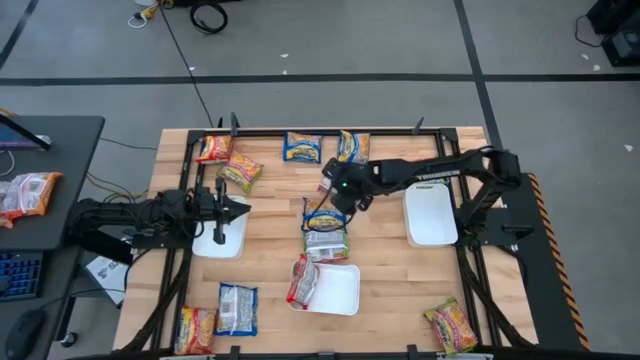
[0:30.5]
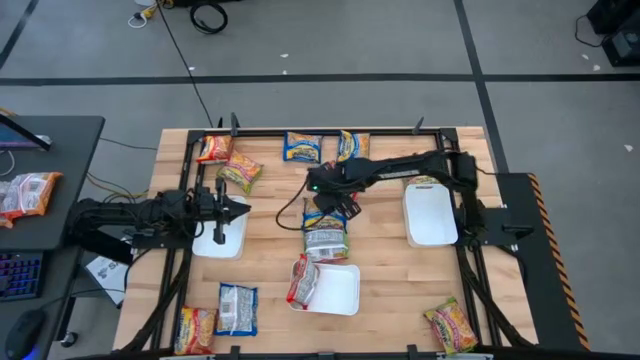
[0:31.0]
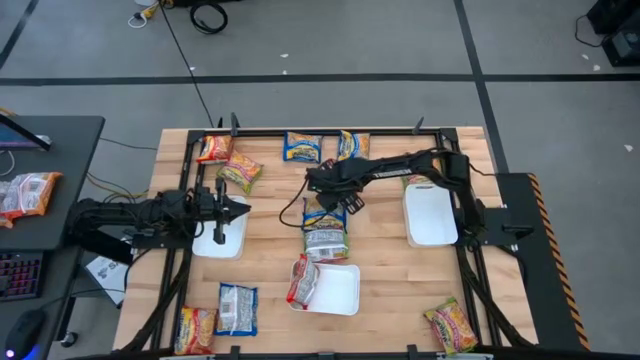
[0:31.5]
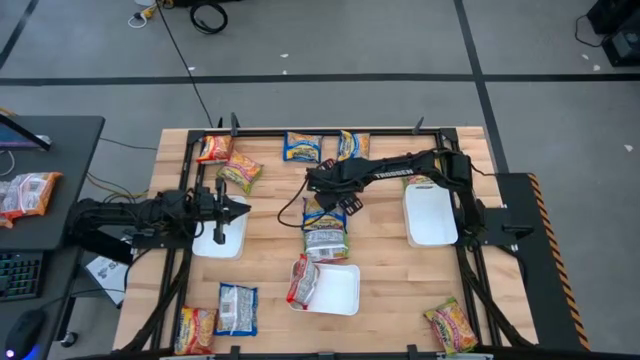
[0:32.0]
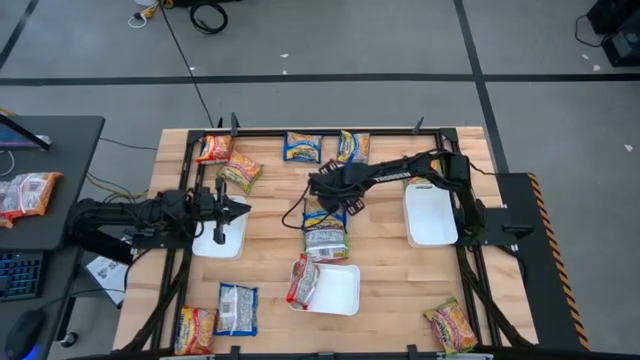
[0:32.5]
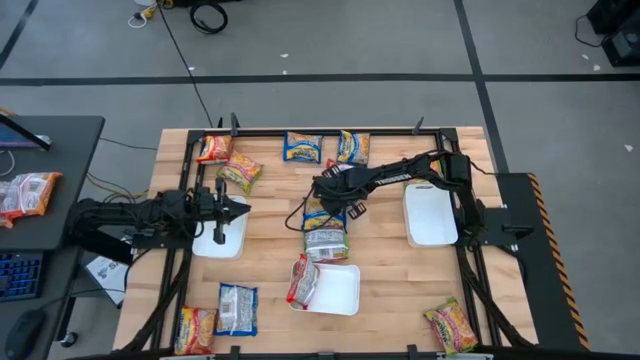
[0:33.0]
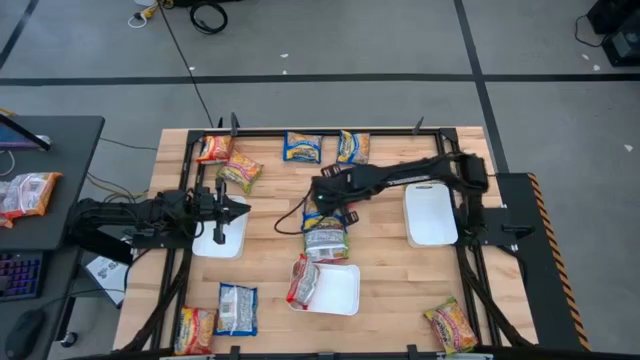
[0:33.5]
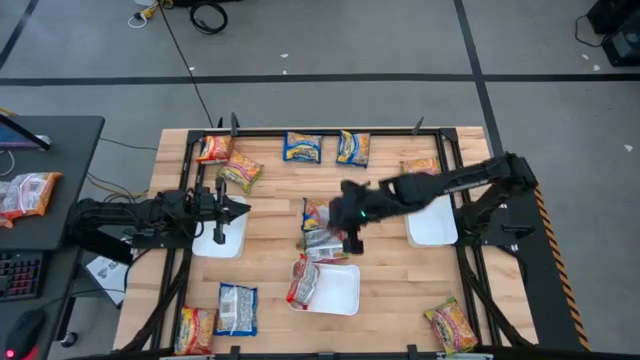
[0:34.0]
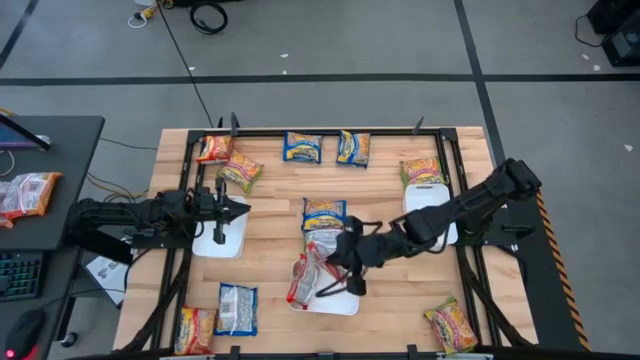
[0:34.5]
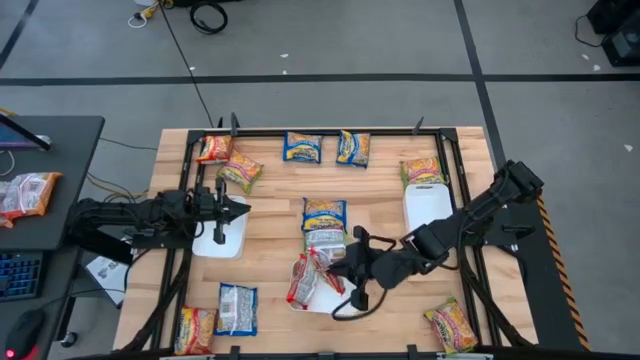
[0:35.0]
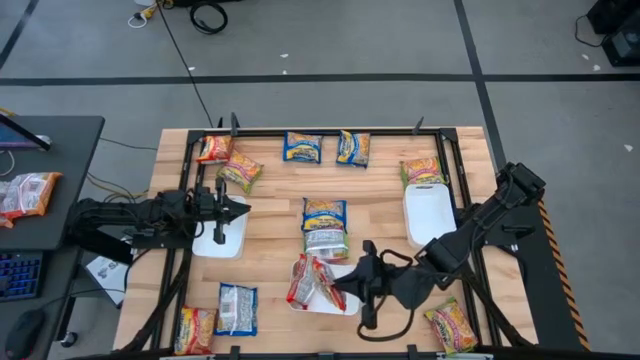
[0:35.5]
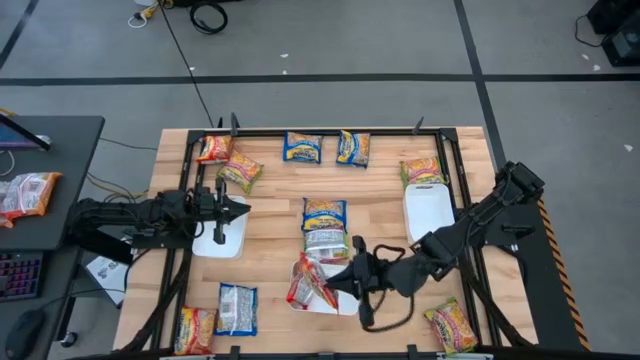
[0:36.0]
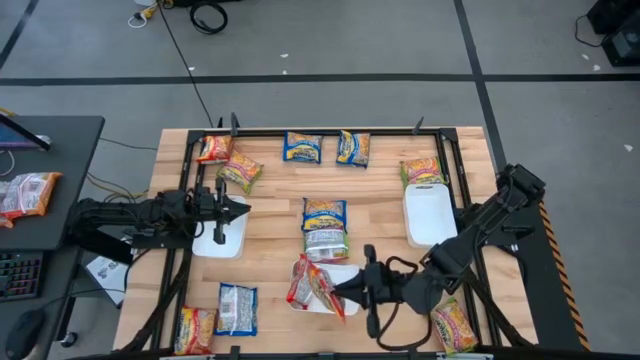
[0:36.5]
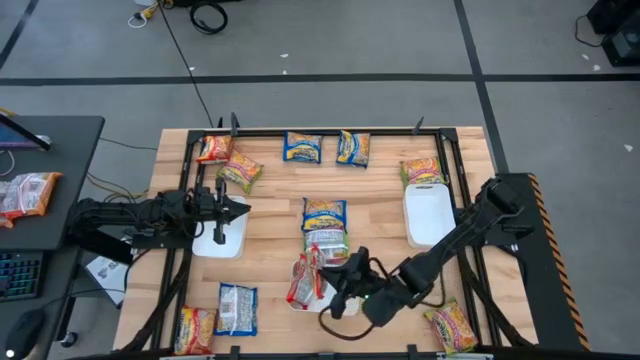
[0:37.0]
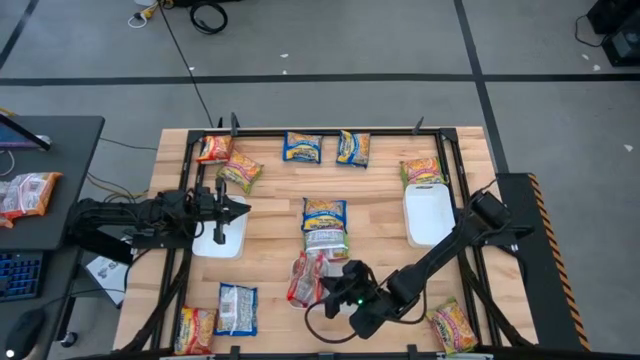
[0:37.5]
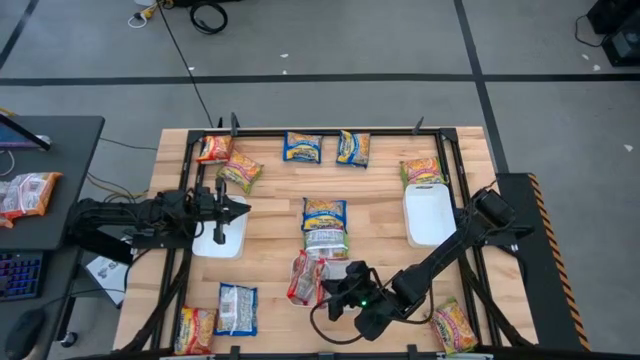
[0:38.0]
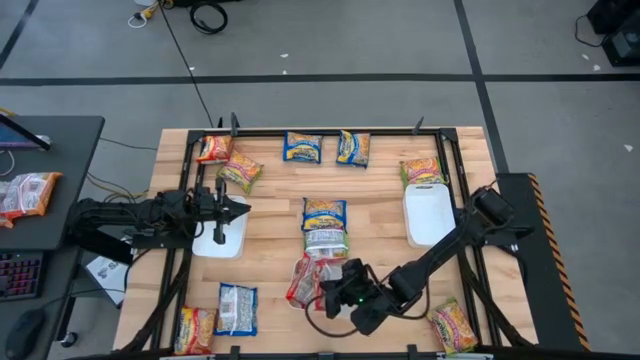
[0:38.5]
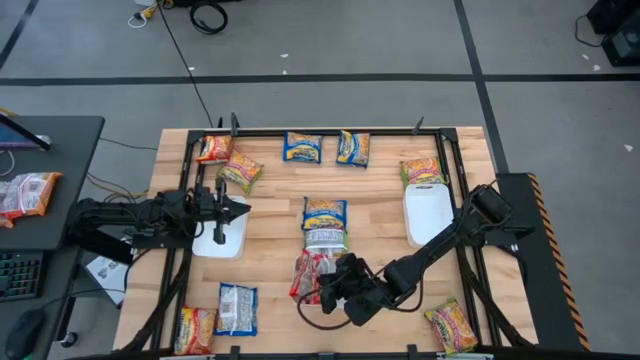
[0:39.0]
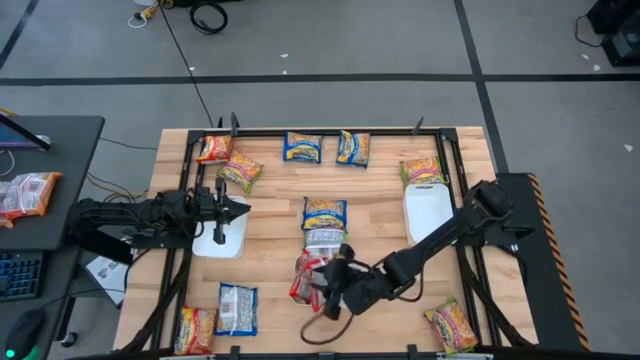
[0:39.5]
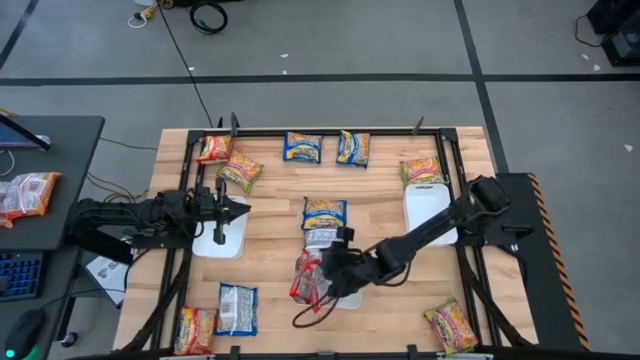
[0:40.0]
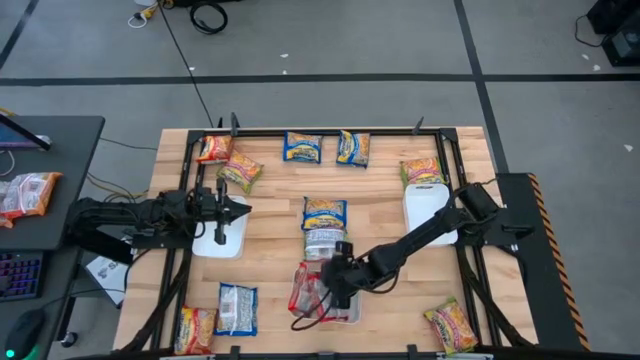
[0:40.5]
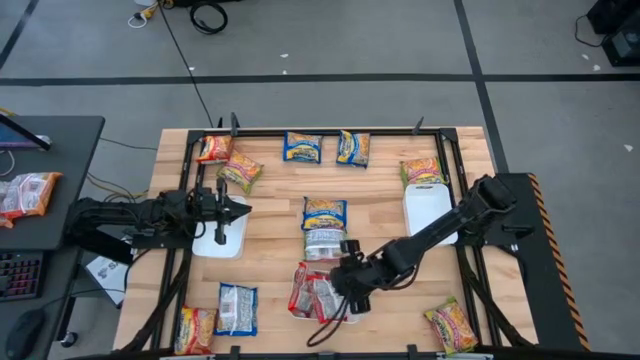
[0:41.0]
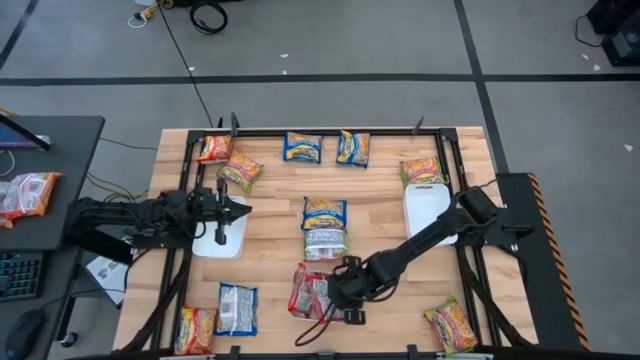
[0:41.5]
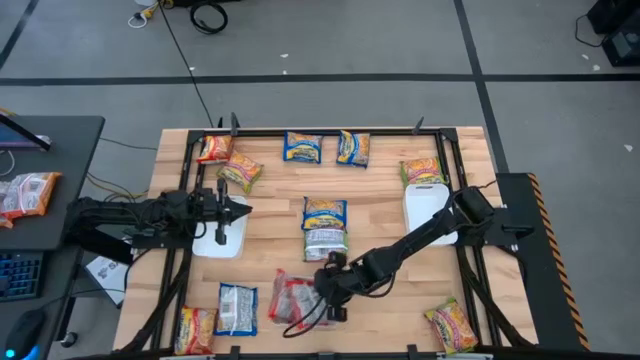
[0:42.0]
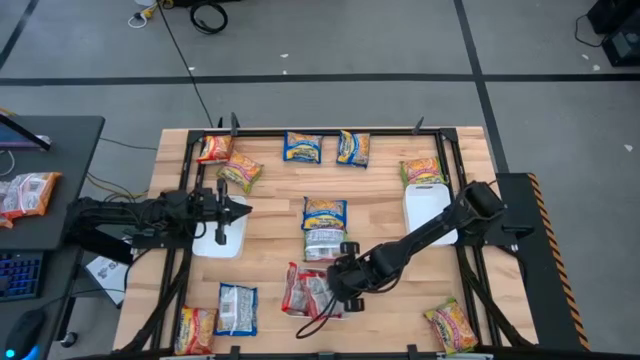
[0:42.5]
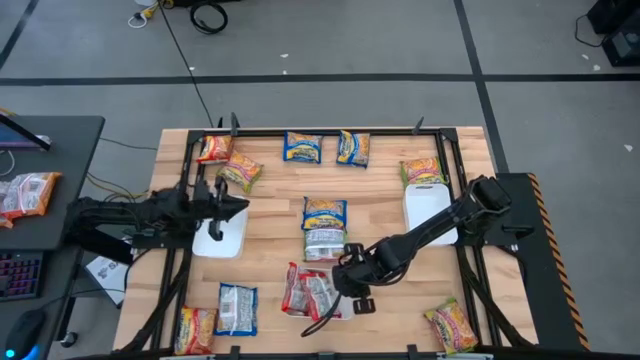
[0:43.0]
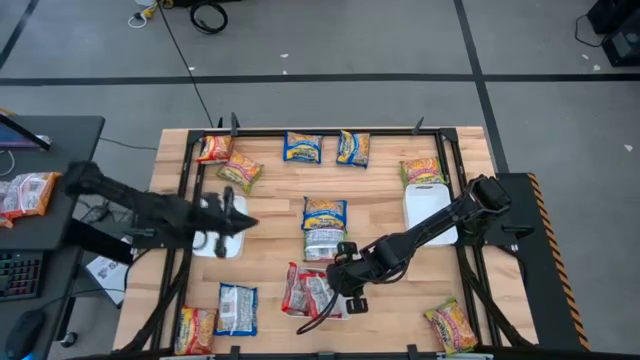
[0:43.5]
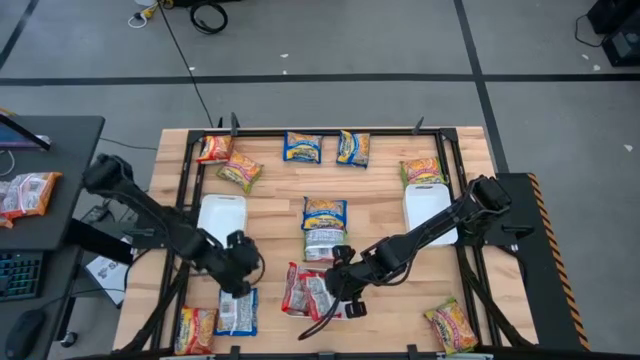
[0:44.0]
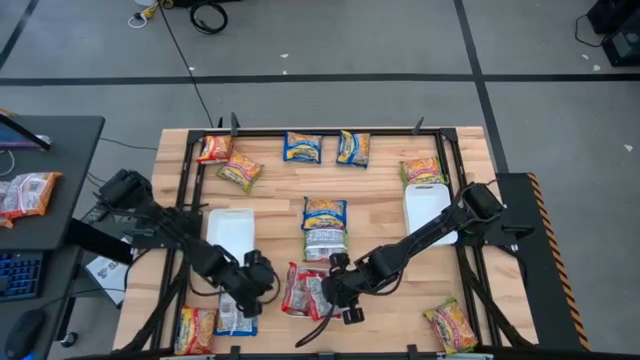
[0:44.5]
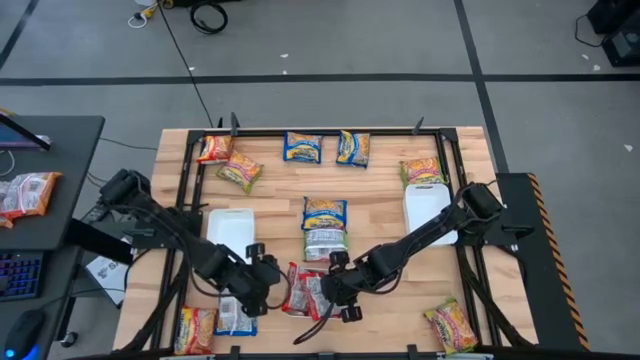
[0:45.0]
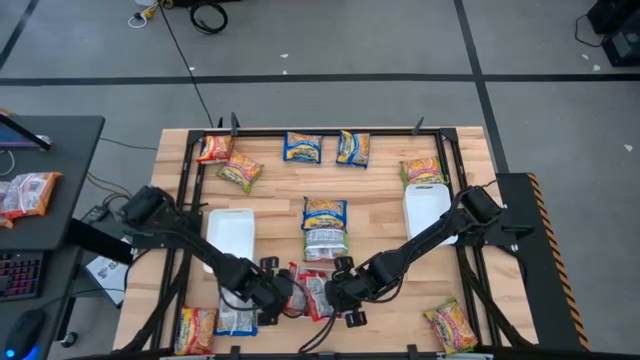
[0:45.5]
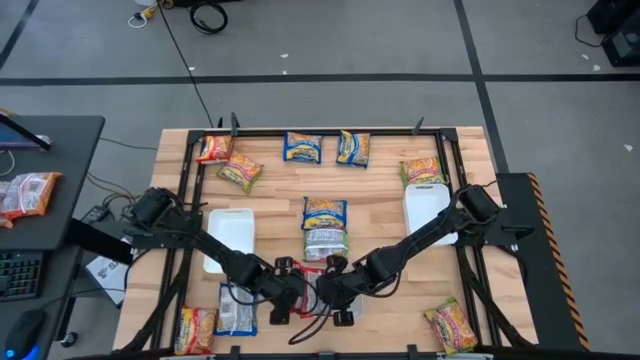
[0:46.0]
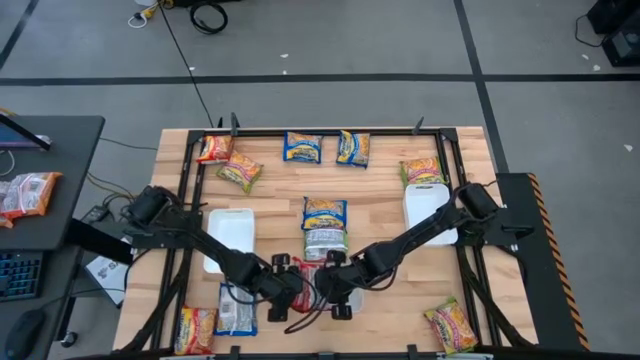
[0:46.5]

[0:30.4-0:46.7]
Task: Sort Maruchan noodles
Put the top right red noodle pack into the bottom white bin

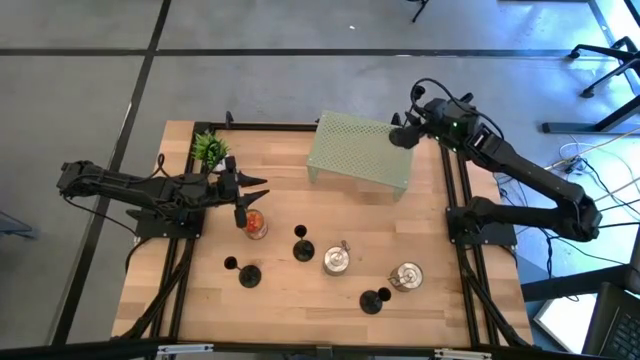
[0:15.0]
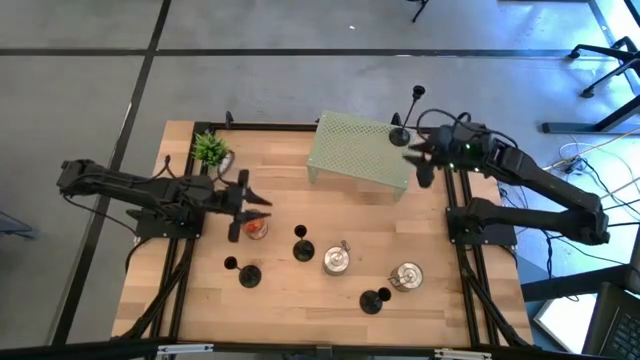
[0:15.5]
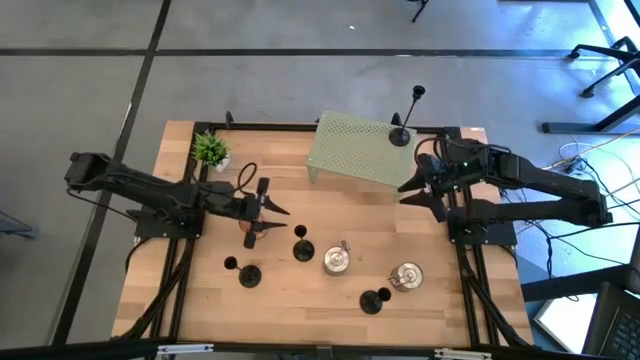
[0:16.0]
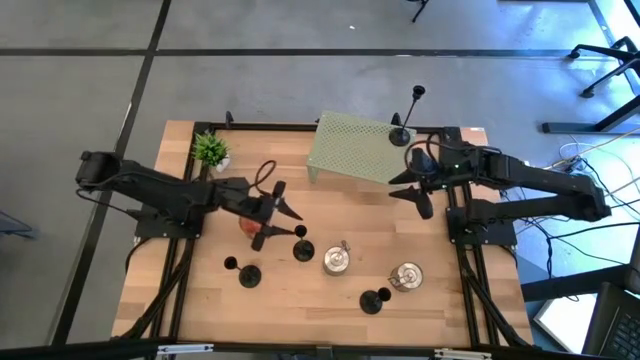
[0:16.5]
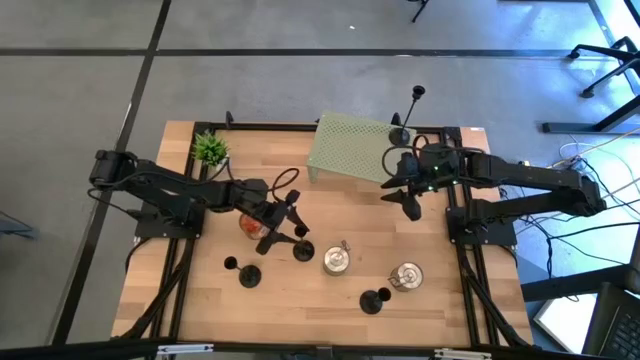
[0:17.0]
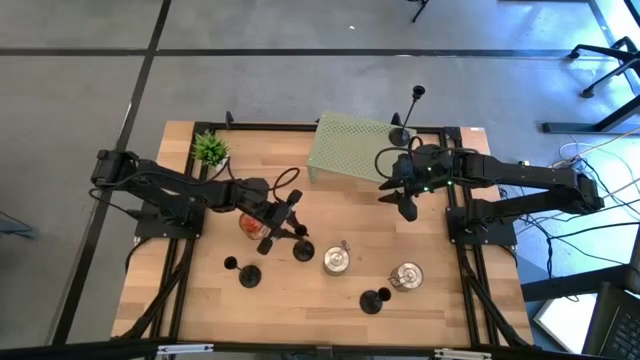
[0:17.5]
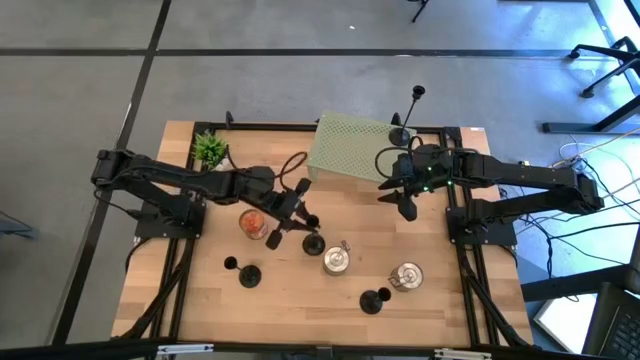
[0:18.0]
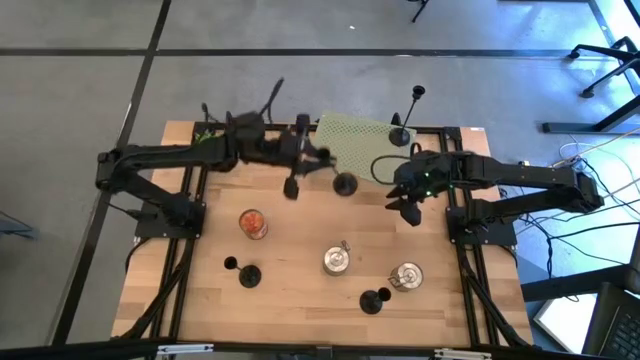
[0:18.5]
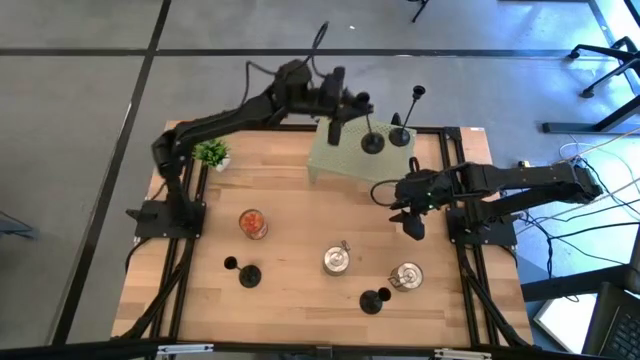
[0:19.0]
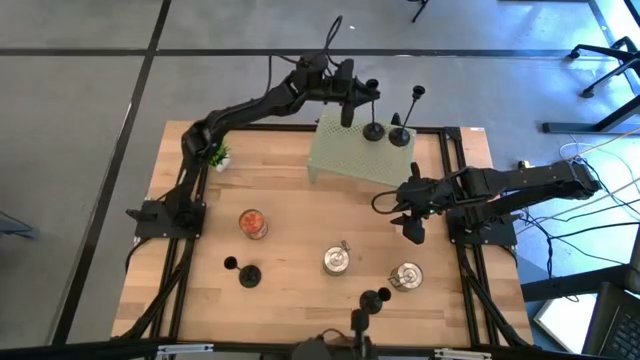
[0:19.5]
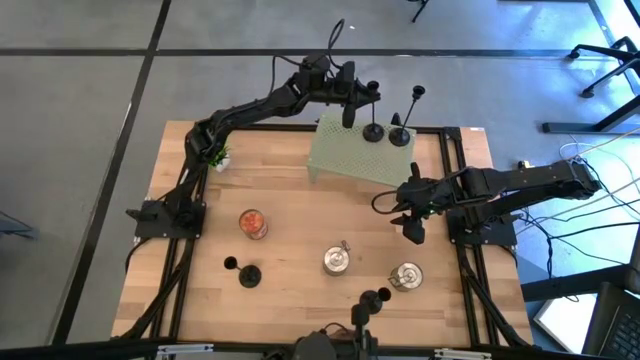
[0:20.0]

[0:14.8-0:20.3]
Task: Pick & Place candle stick holders
Put the top black candle holder on the shelf
